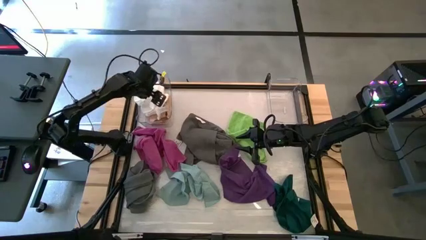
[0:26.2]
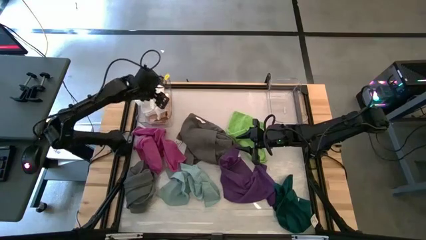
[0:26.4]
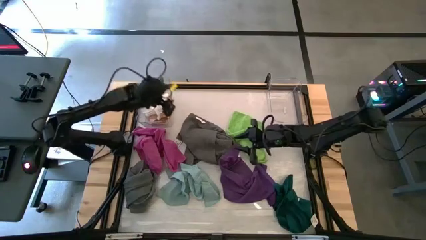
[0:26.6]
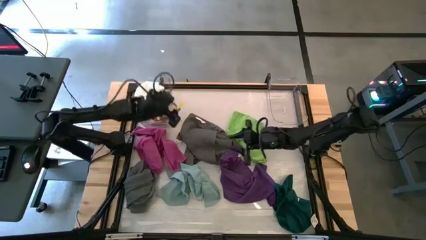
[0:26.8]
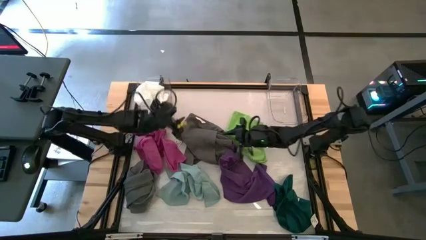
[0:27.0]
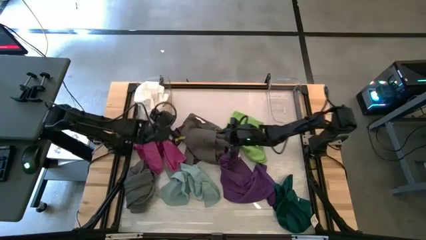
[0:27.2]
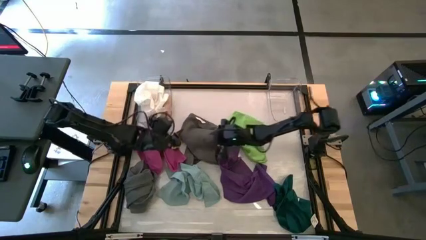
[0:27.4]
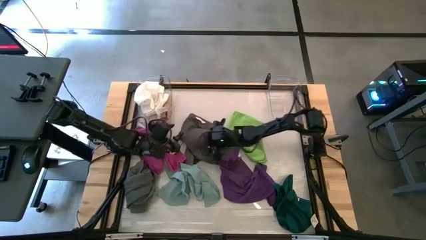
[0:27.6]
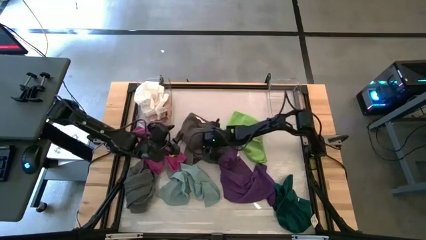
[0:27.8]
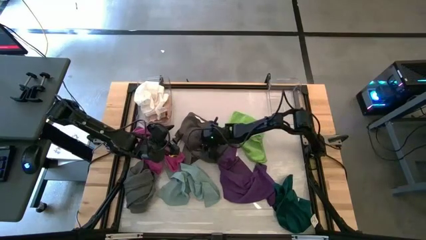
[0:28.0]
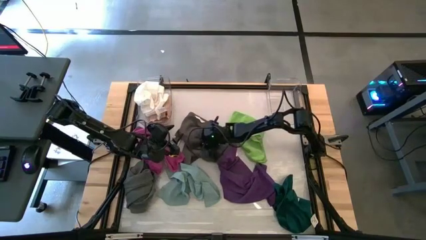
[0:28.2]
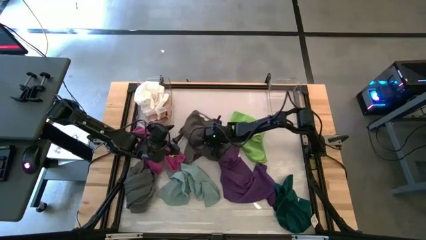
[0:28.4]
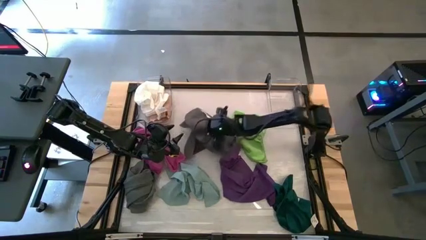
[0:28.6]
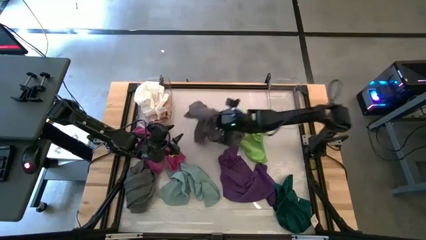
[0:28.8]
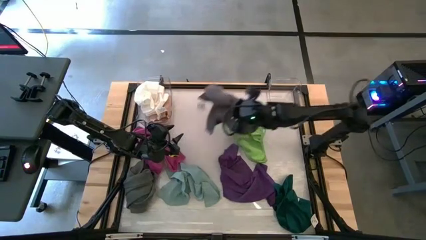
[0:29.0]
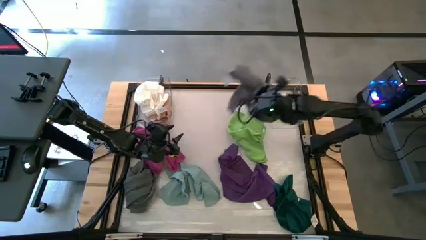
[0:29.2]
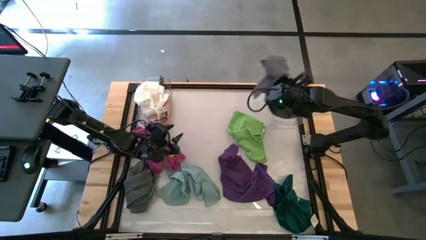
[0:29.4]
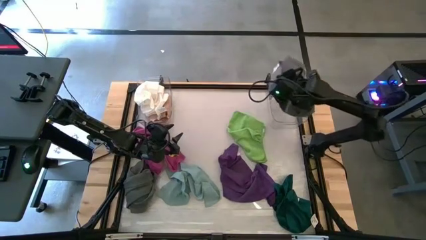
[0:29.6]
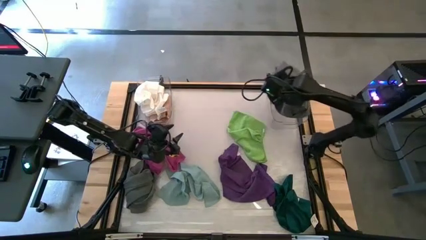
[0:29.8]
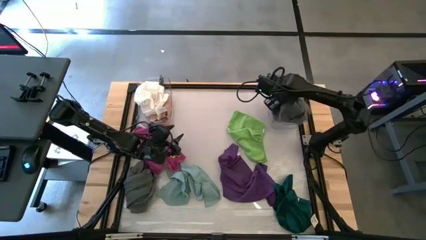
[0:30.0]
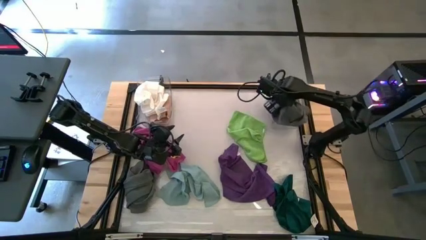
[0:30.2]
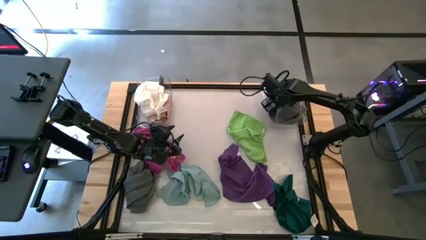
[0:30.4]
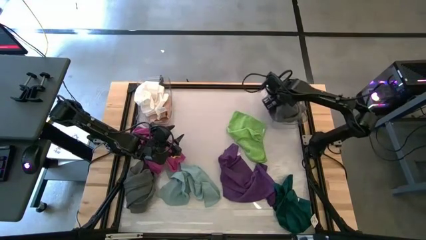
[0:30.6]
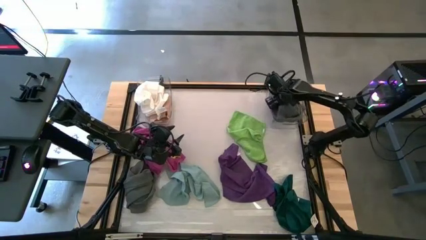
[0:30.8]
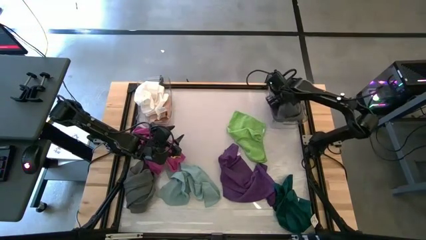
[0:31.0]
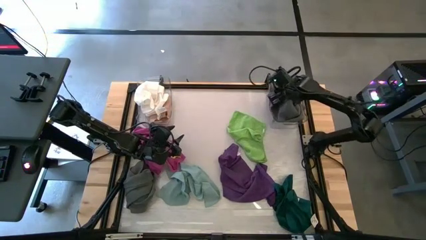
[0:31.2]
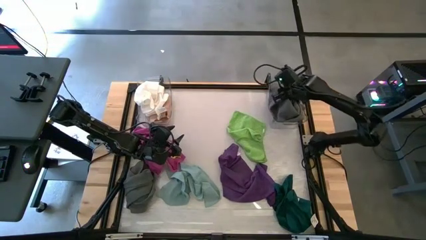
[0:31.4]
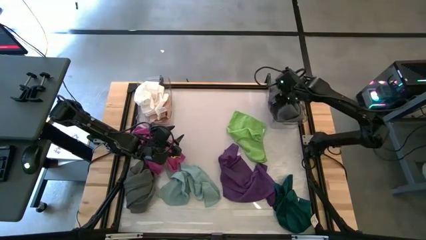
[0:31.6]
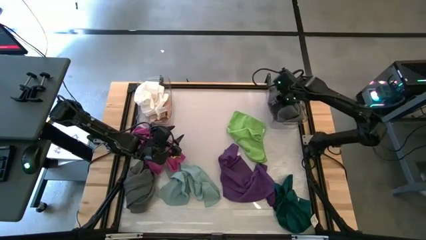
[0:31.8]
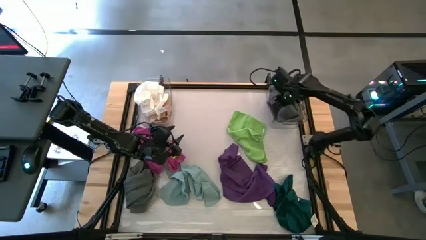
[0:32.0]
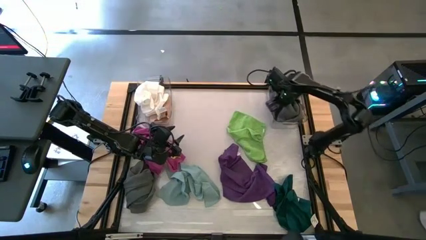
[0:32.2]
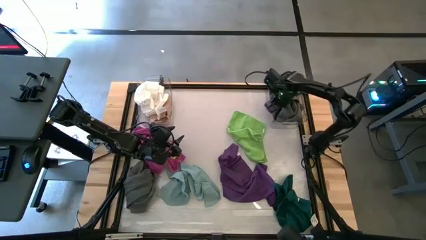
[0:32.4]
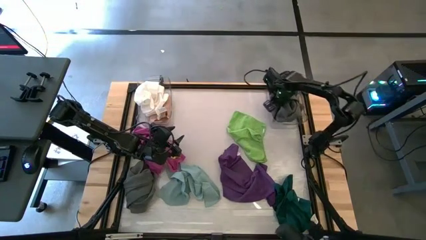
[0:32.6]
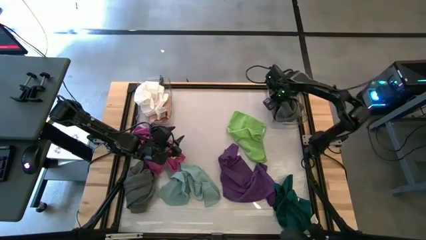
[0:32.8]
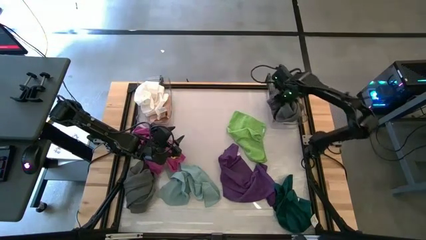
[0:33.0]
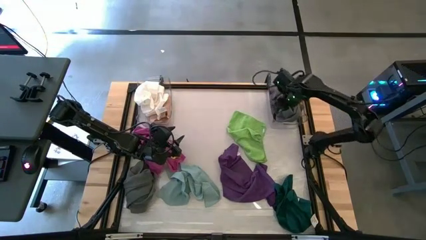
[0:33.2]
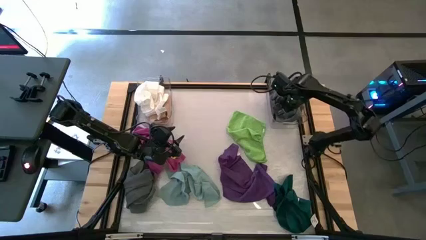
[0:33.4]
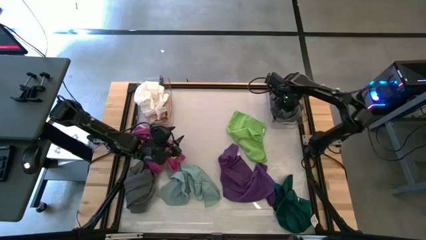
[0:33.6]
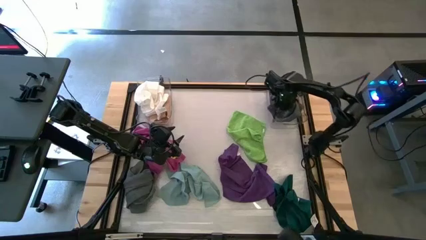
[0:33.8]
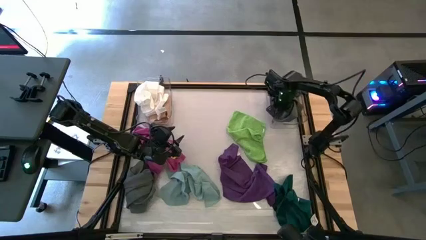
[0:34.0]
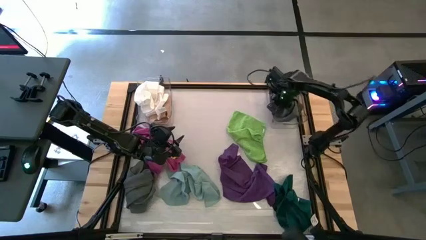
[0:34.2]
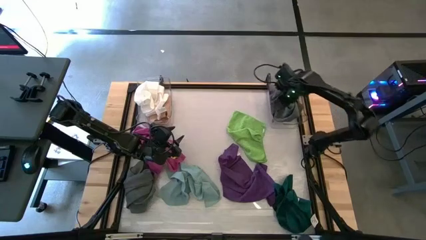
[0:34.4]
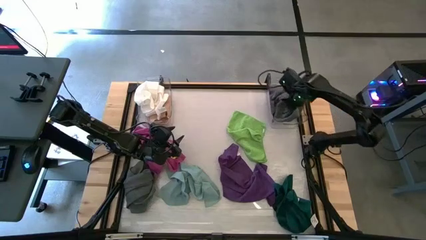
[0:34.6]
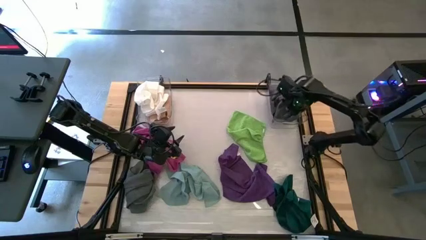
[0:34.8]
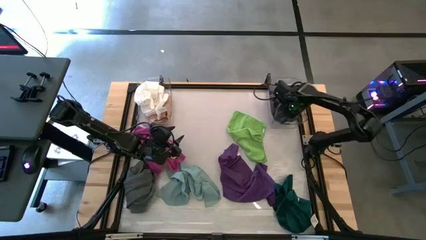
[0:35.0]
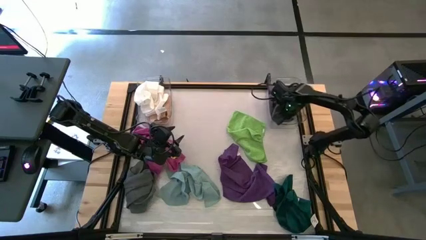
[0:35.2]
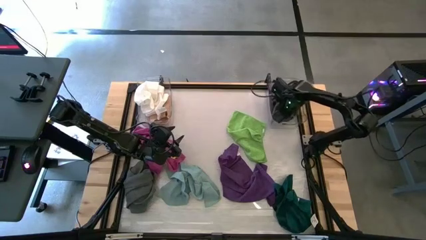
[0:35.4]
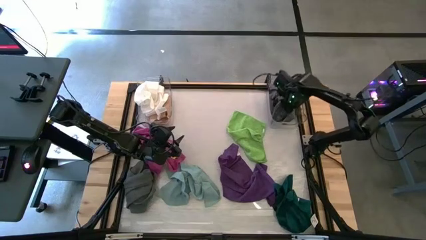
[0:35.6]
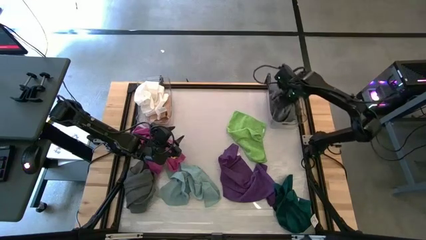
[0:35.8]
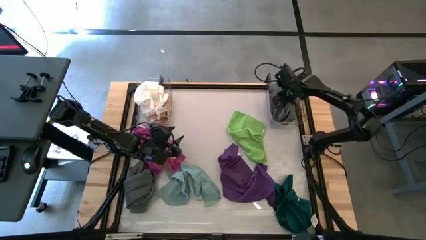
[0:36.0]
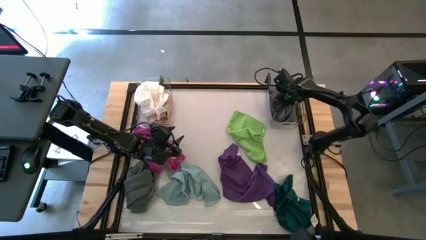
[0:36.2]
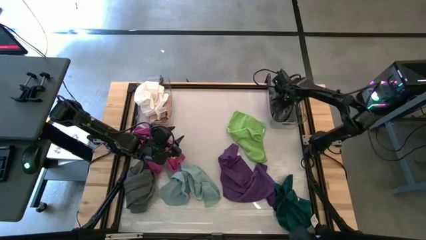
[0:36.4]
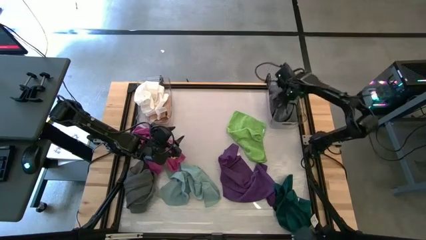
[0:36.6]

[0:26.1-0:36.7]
Task: Sort towels by color in basket
Put the top gray towel into the right transparent bin
